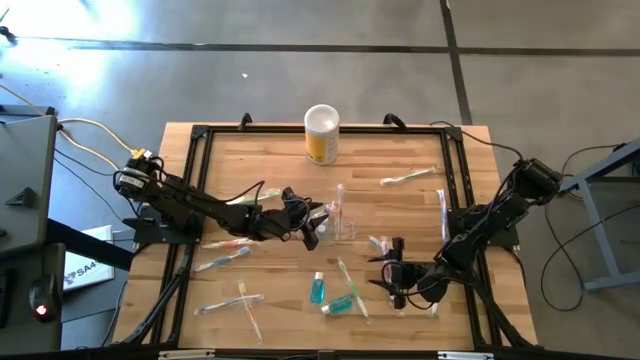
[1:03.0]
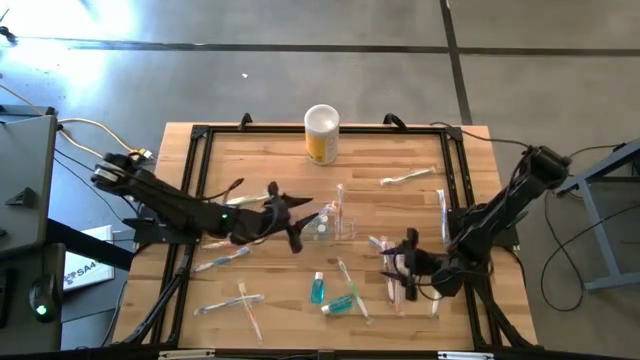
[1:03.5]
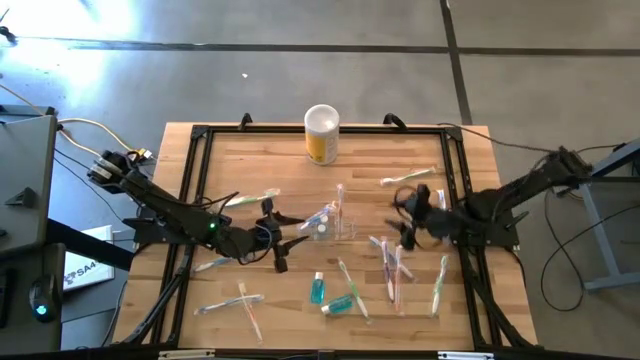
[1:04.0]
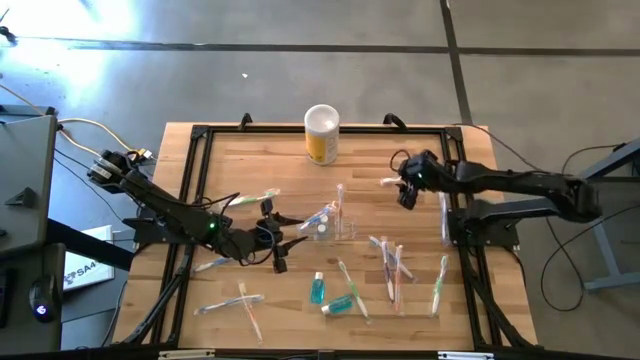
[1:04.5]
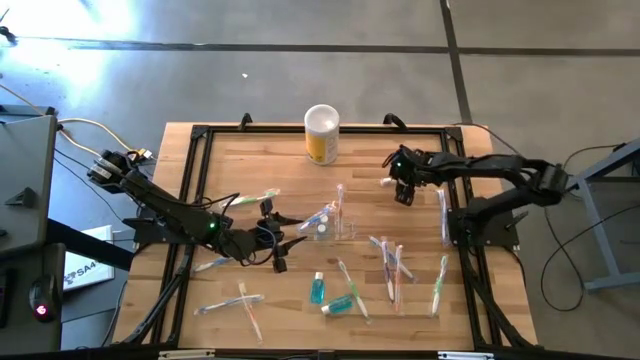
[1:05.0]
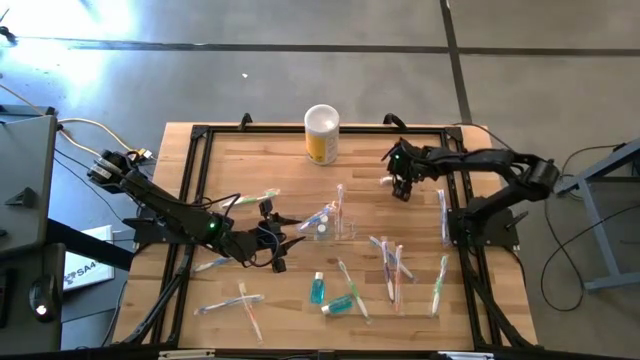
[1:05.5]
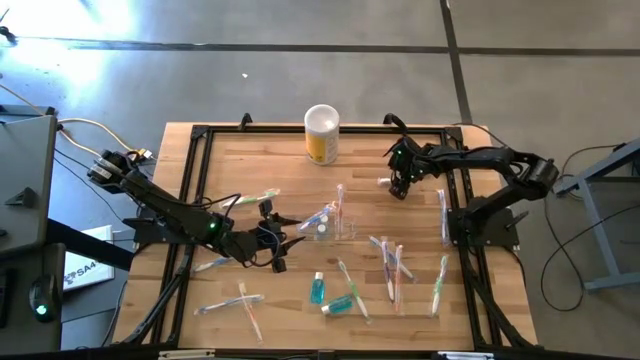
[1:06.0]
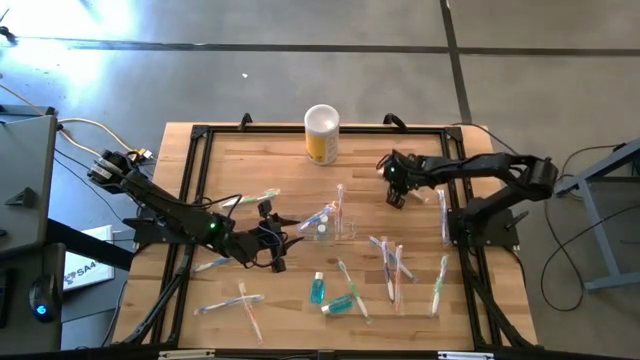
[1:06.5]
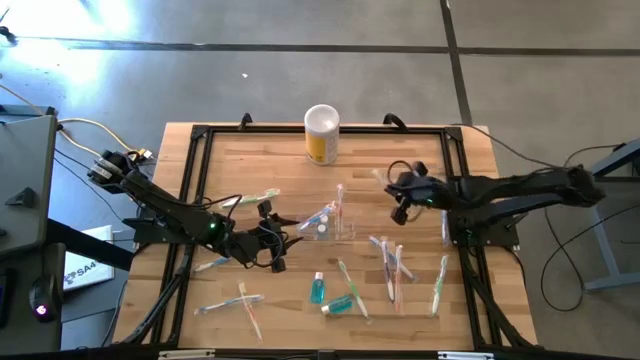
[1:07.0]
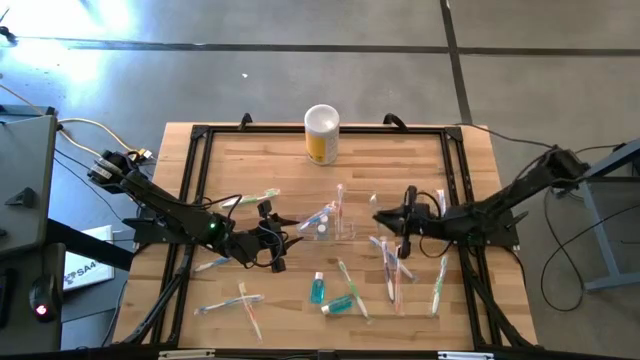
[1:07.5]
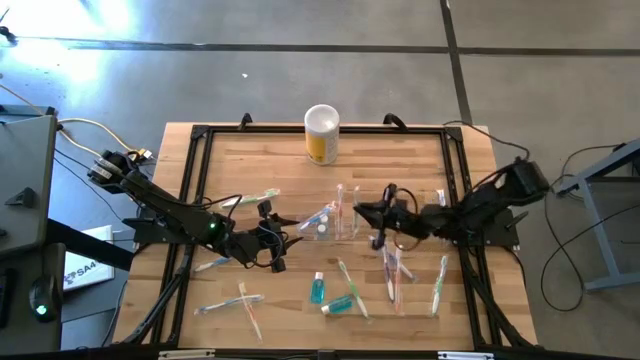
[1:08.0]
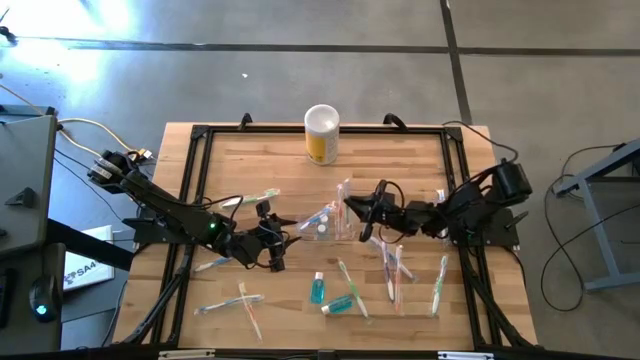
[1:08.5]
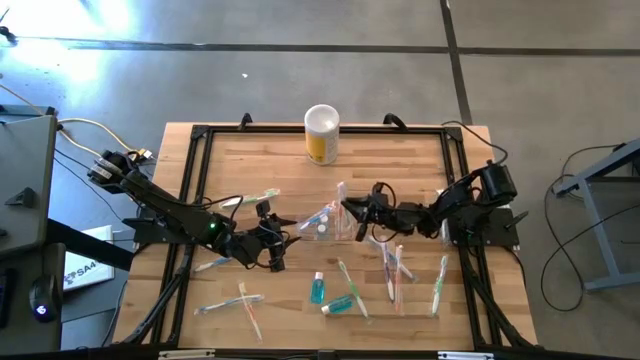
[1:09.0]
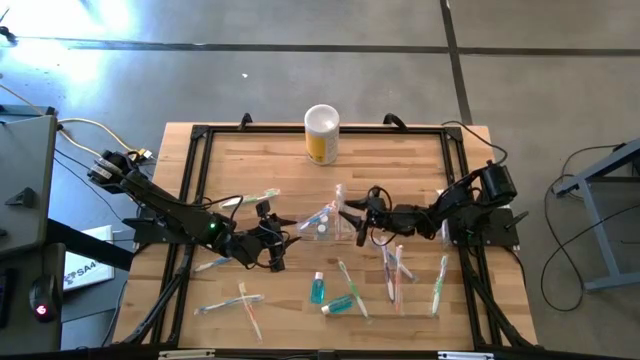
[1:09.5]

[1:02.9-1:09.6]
Task: Pick & Place toothbrushing station
Put the green toothbrush into the right part of the transparent organizer

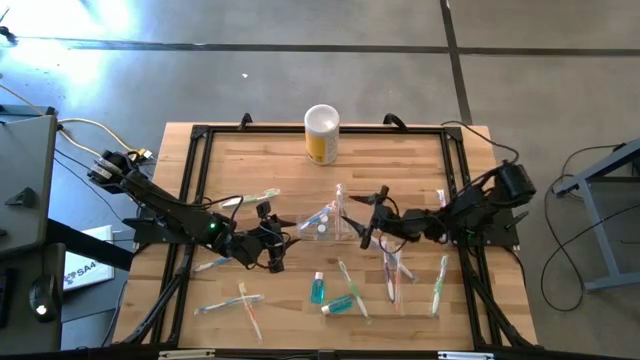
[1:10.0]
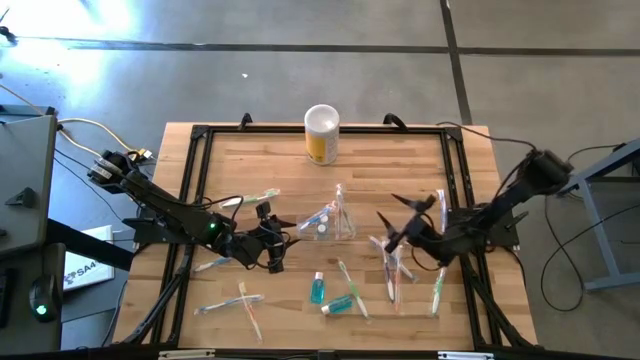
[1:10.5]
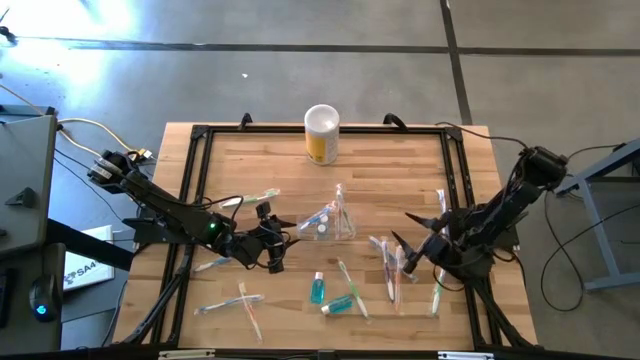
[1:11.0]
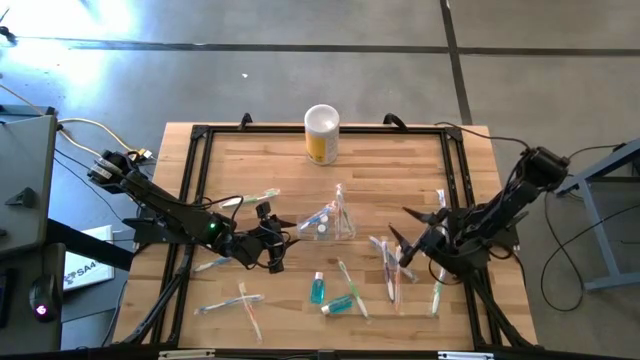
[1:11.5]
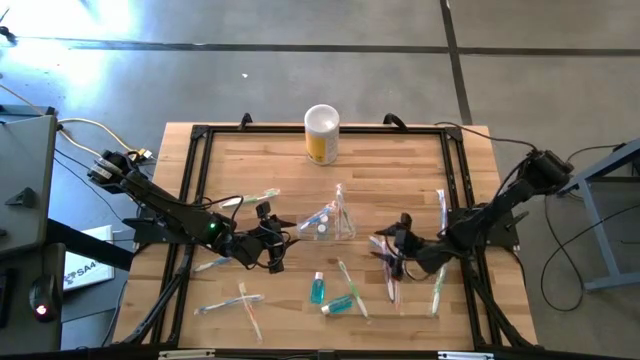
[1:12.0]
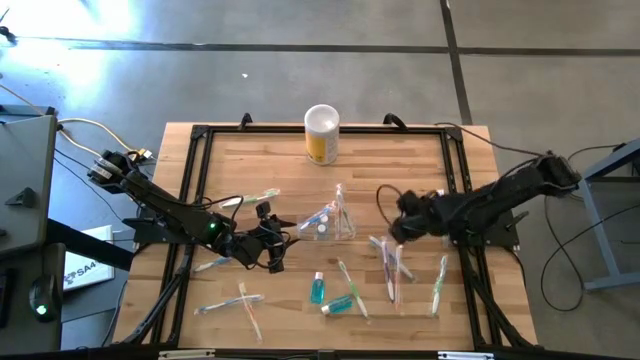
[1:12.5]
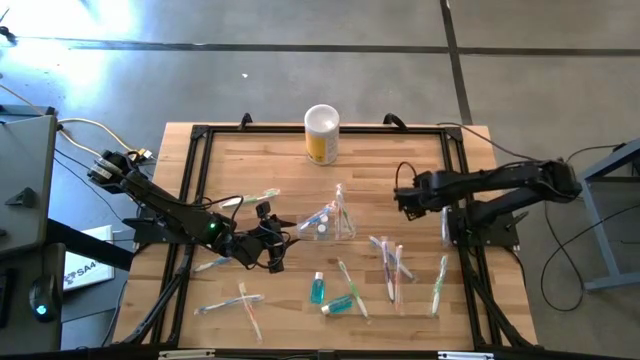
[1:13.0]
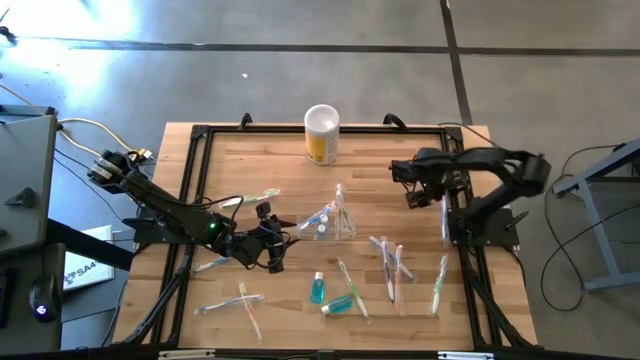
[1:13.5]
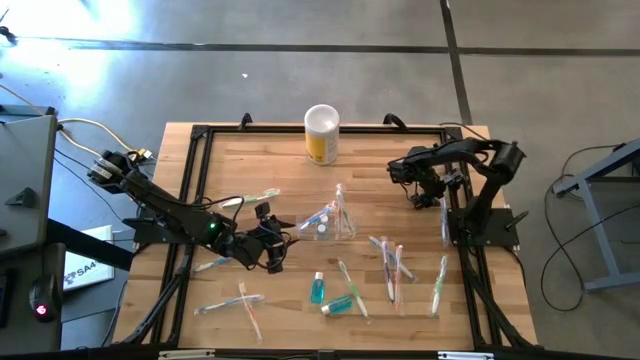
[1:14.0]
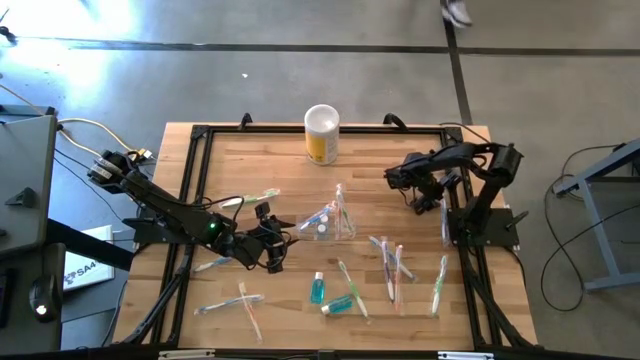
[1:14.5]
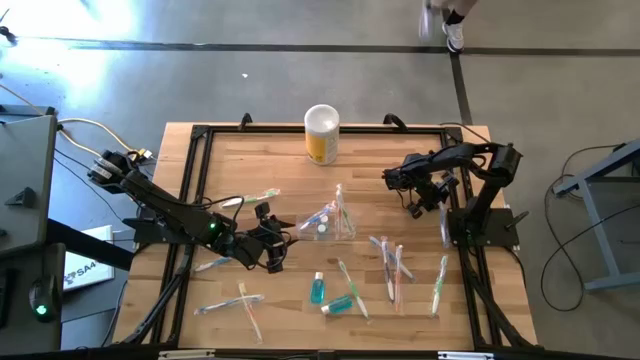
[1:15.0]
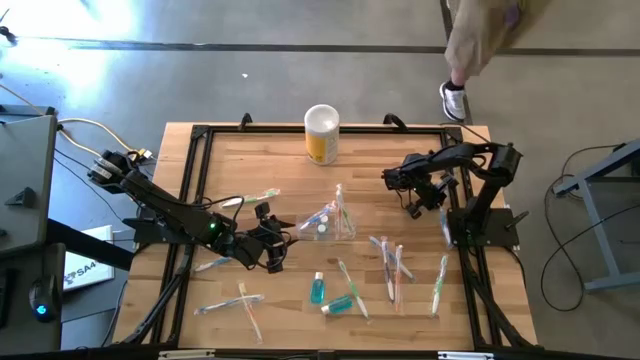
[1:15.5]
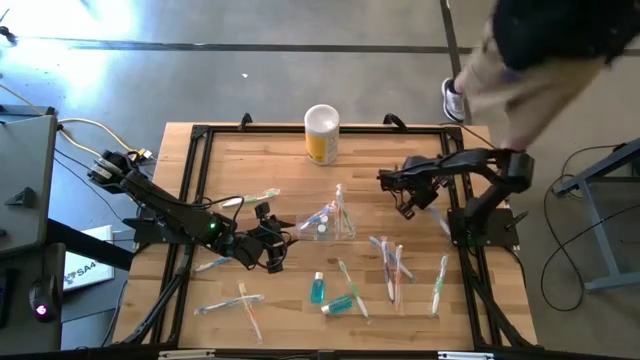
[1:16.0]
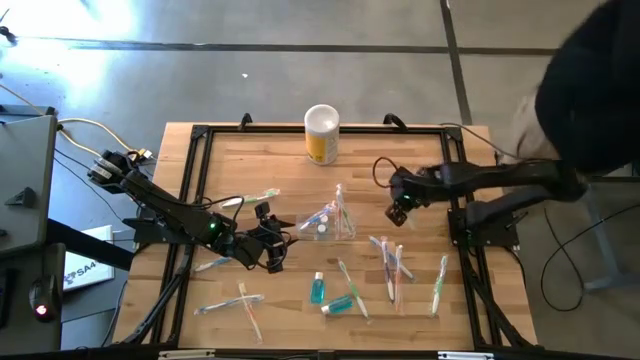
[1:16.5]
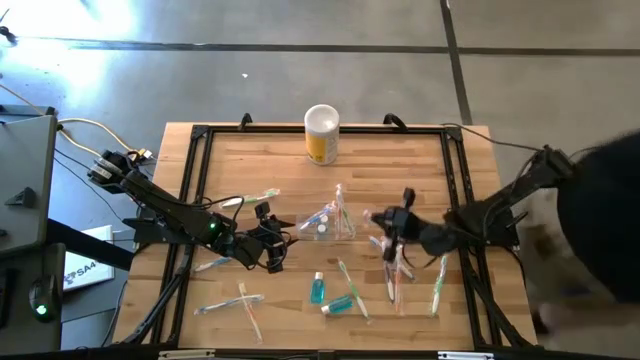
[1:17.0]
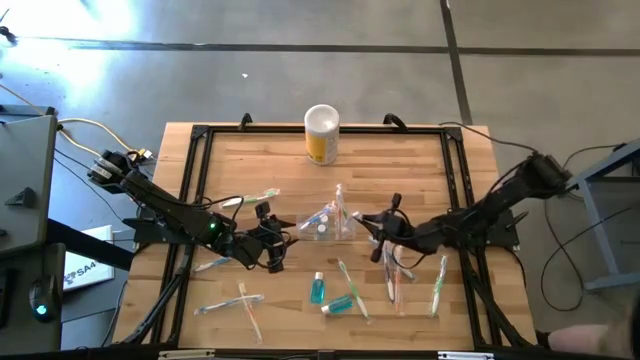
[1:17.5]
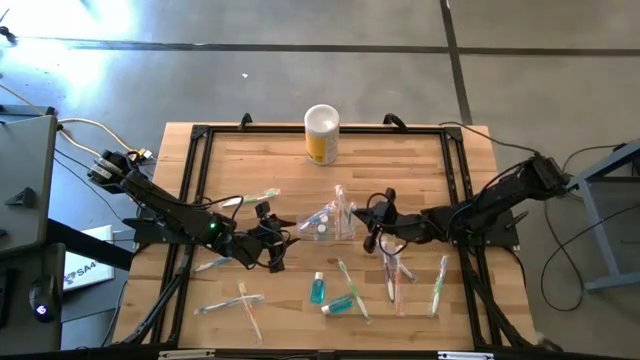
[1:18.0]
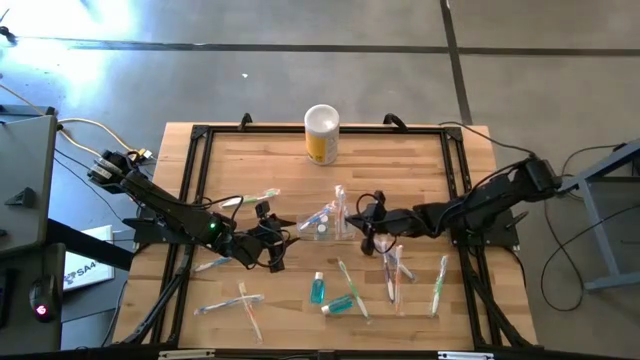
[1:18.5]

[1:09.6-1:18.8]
Put the blue toothbrush into the right part of the transparent organizer

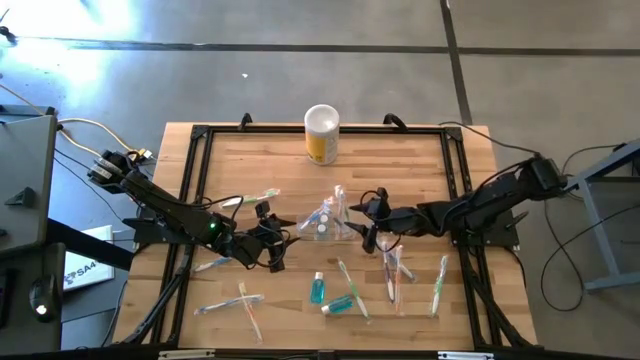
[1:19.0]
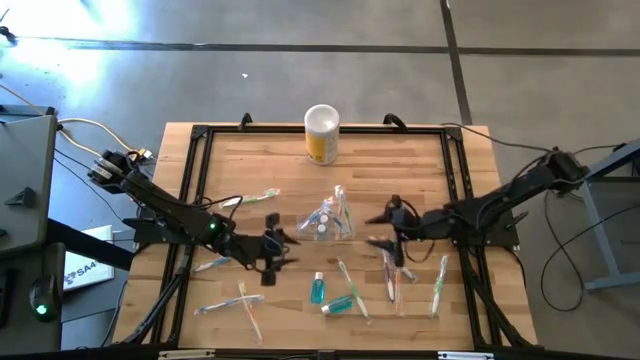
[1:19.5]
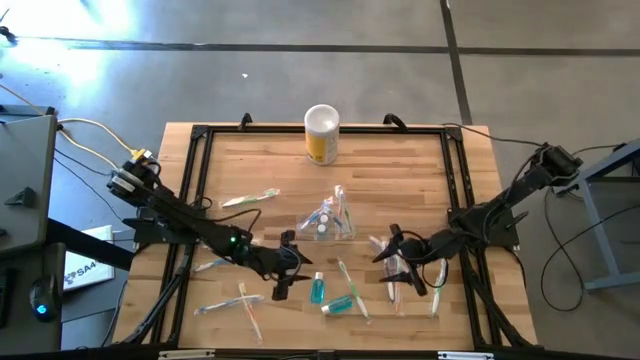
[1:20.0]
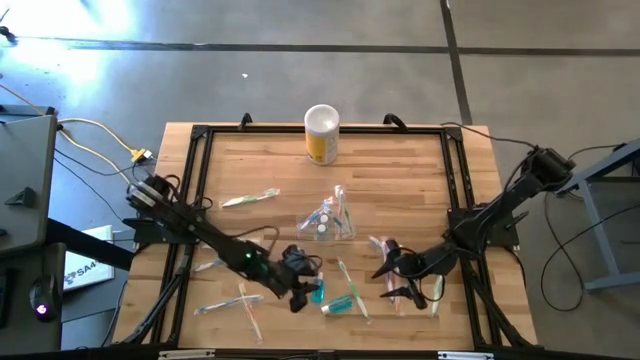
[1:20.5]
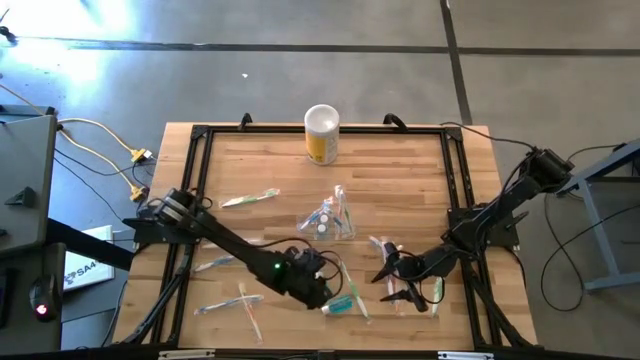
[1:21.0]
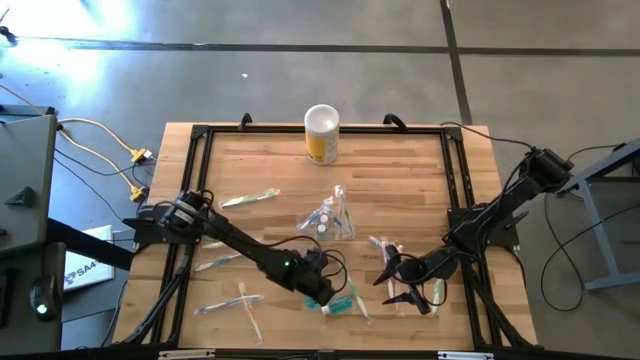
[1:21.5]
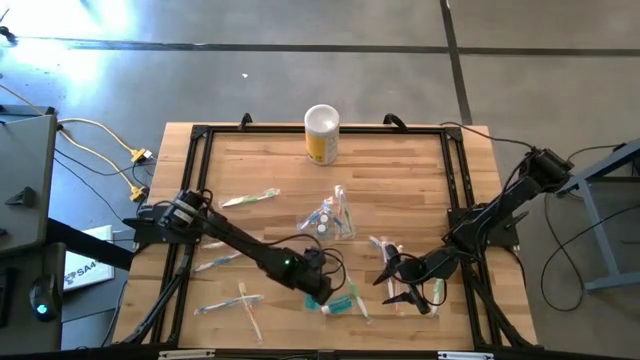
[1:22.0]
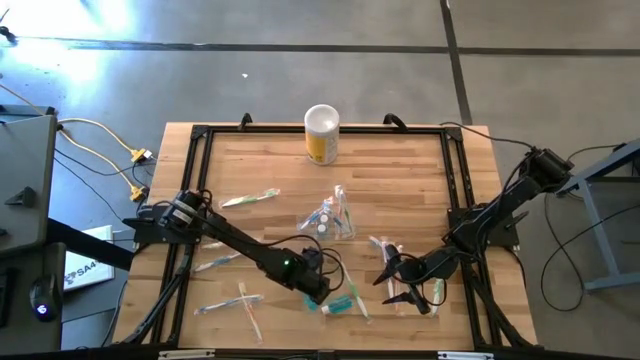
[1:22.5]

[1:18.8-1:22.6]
Put the blue mouthwash into the middle part of the transparent organizer
